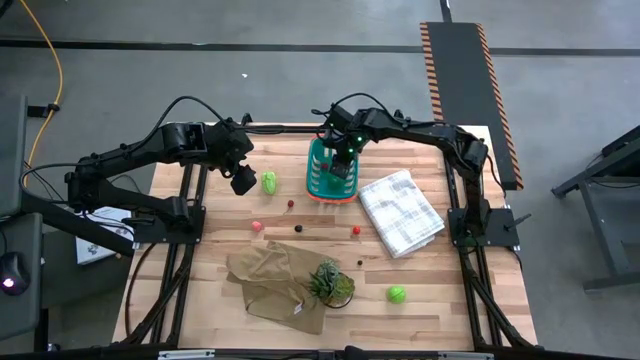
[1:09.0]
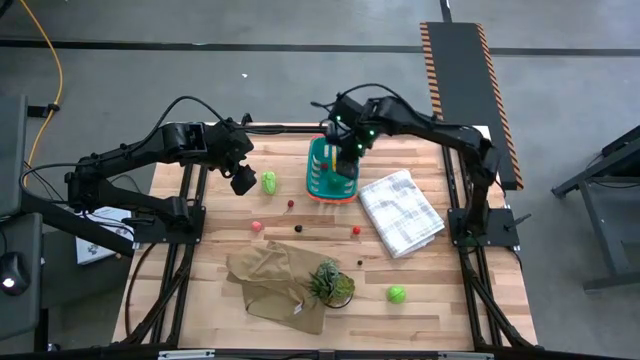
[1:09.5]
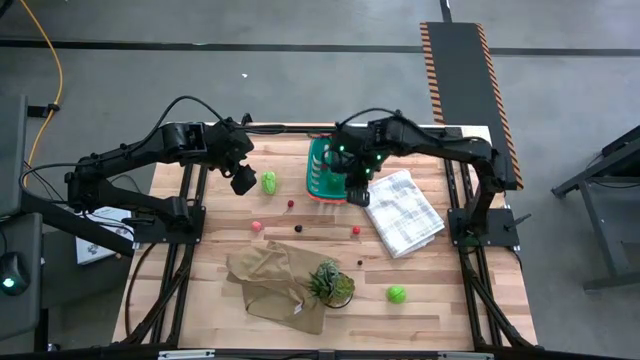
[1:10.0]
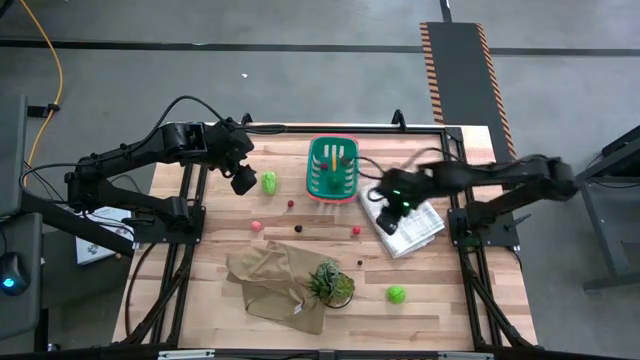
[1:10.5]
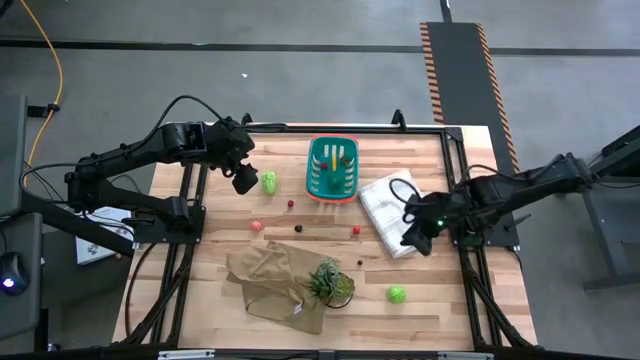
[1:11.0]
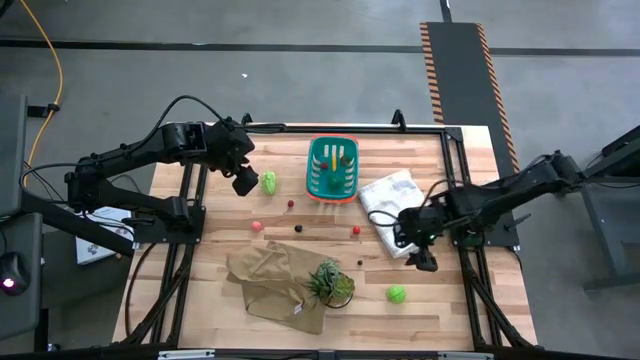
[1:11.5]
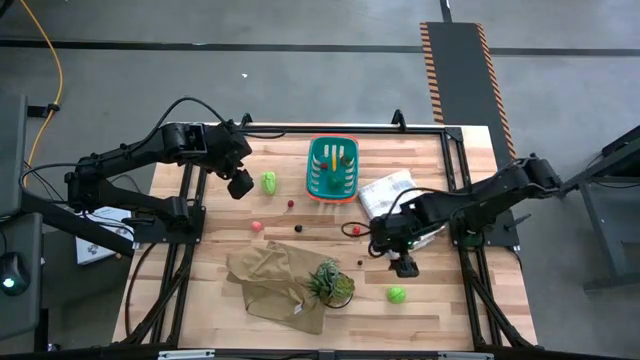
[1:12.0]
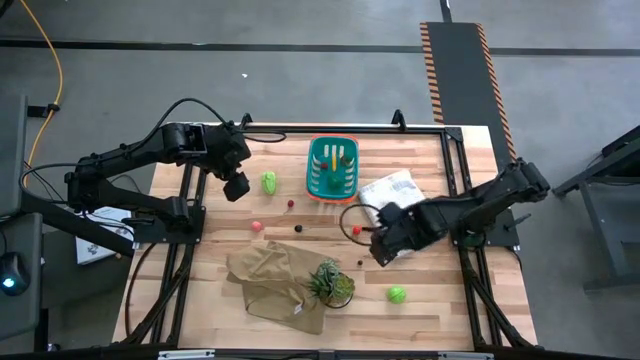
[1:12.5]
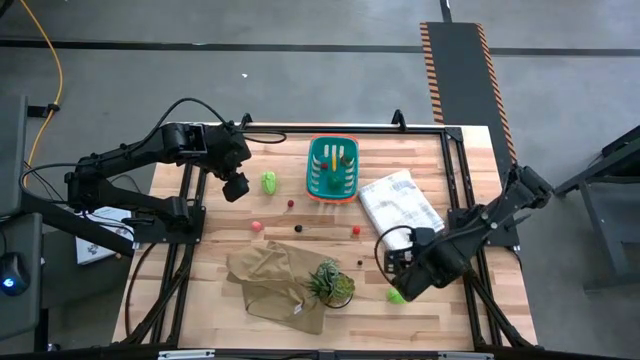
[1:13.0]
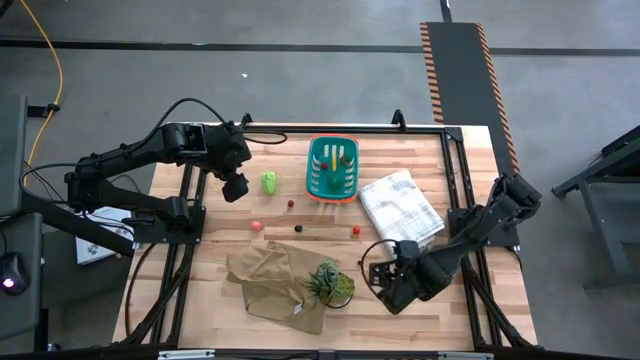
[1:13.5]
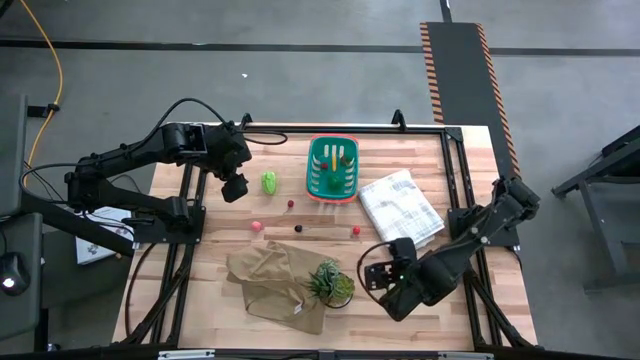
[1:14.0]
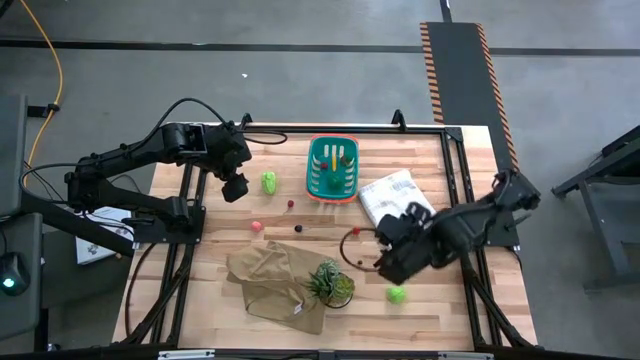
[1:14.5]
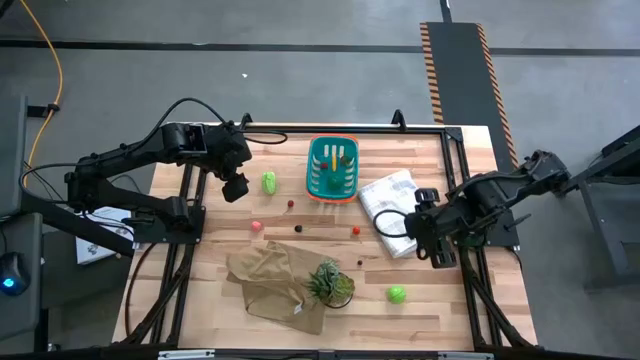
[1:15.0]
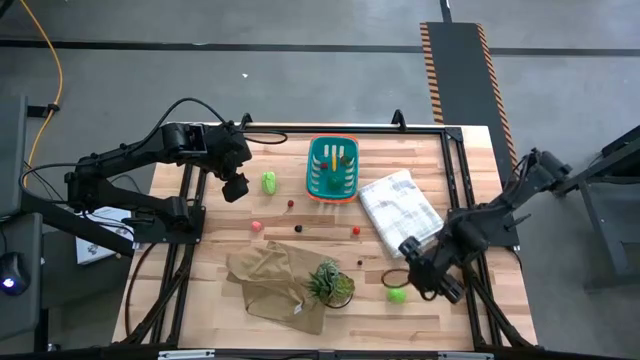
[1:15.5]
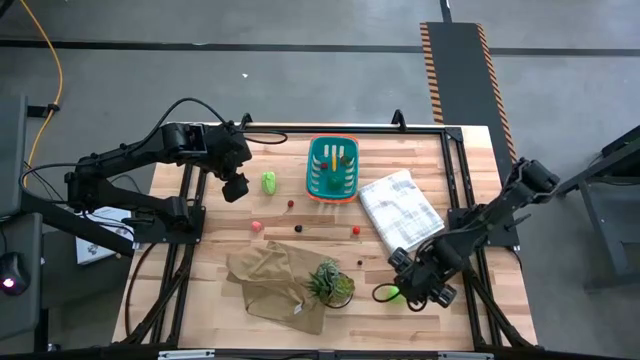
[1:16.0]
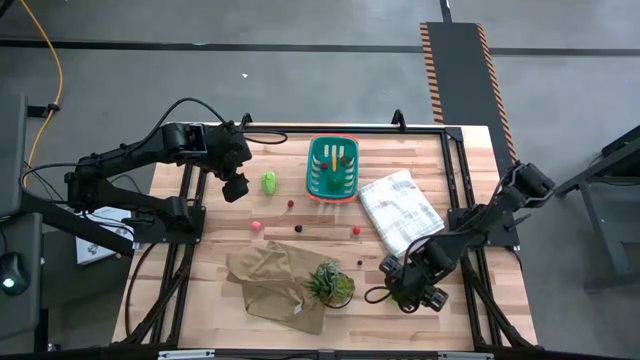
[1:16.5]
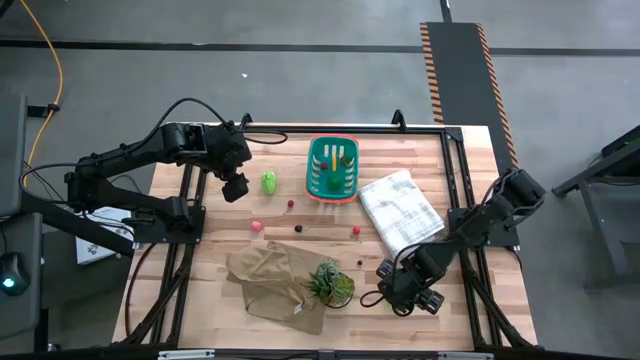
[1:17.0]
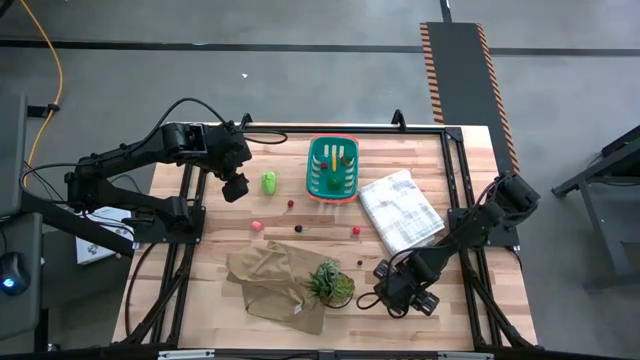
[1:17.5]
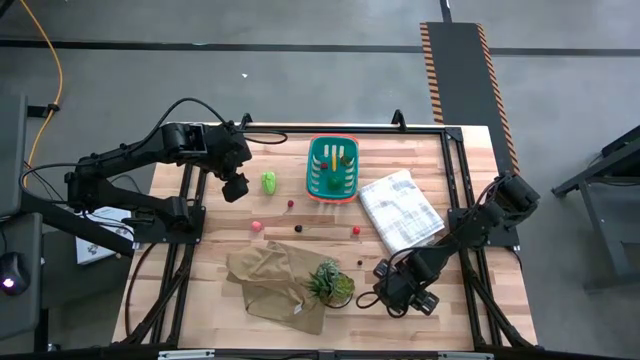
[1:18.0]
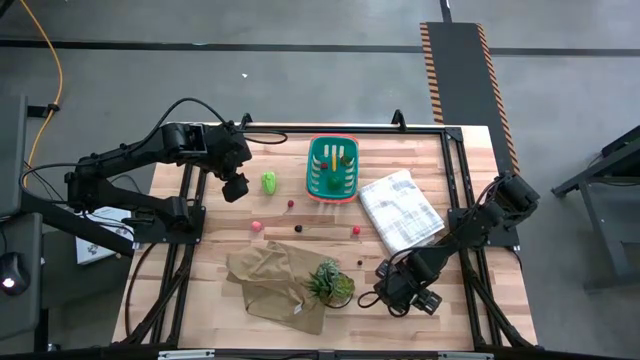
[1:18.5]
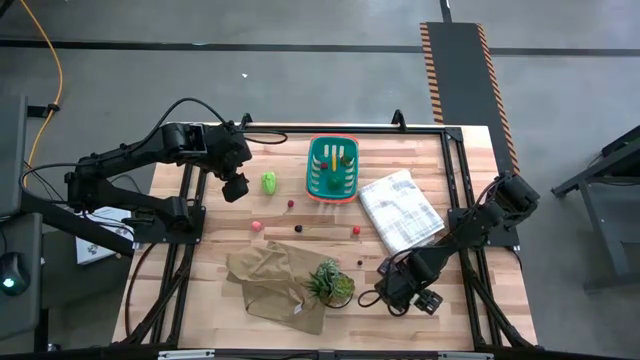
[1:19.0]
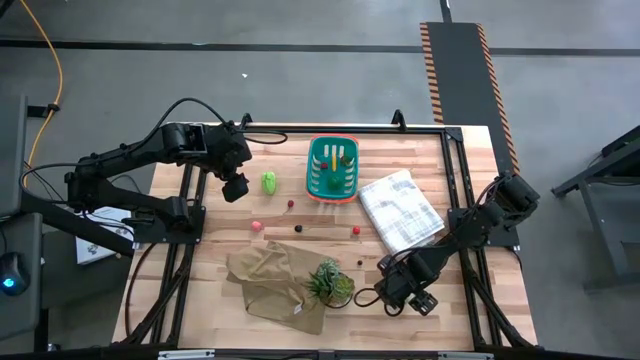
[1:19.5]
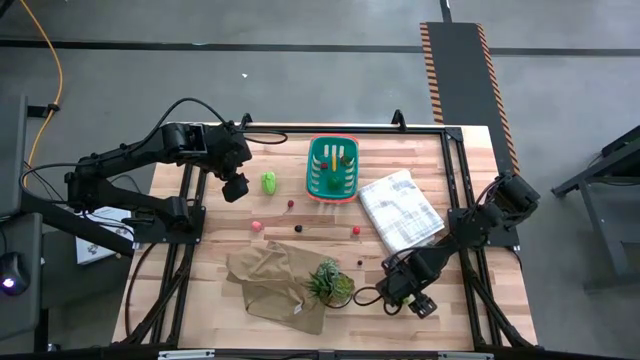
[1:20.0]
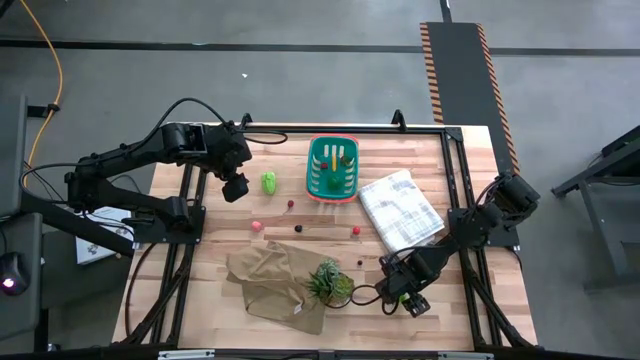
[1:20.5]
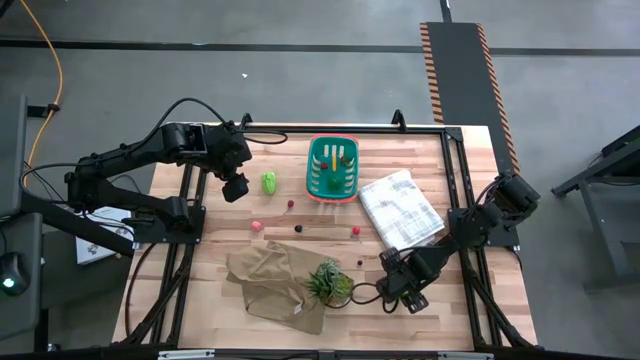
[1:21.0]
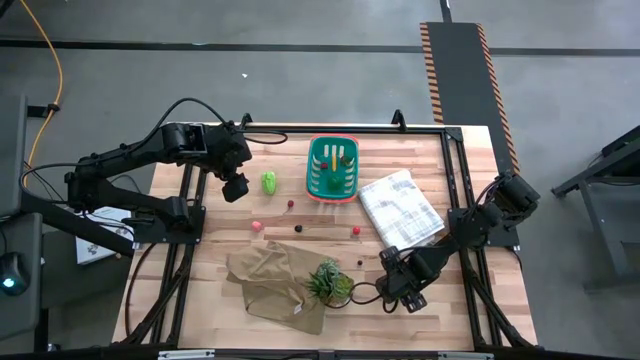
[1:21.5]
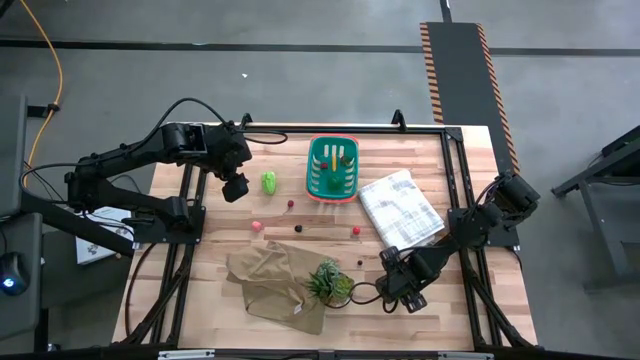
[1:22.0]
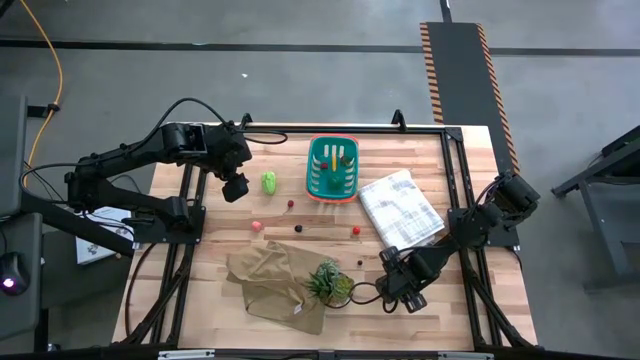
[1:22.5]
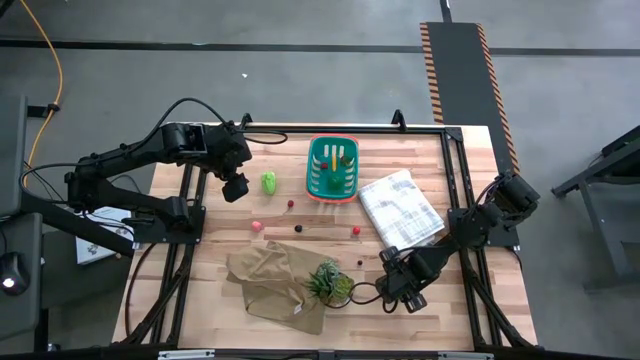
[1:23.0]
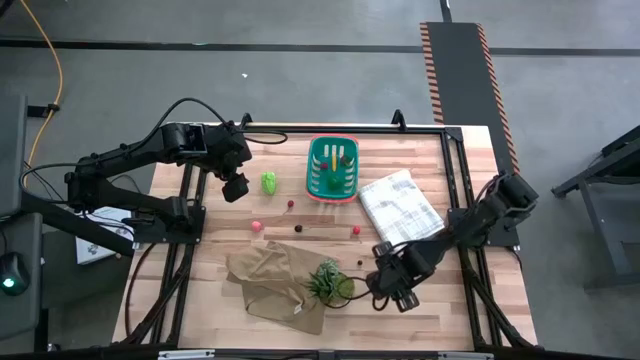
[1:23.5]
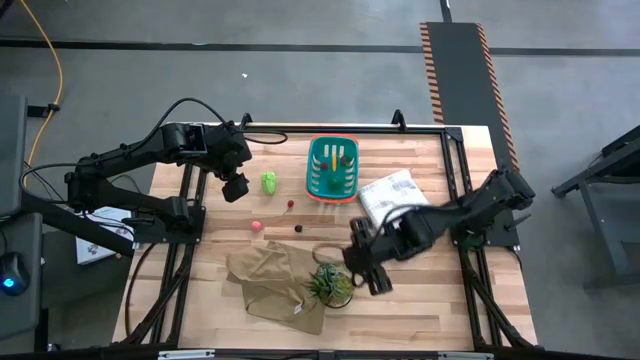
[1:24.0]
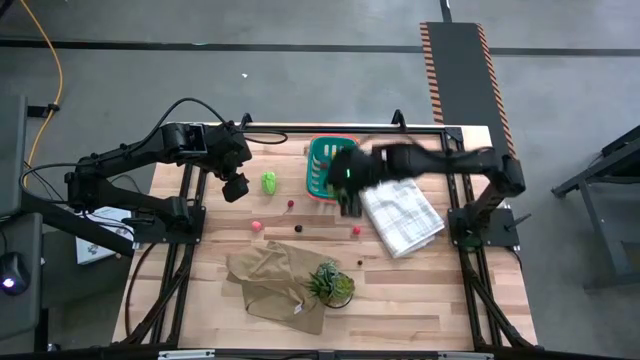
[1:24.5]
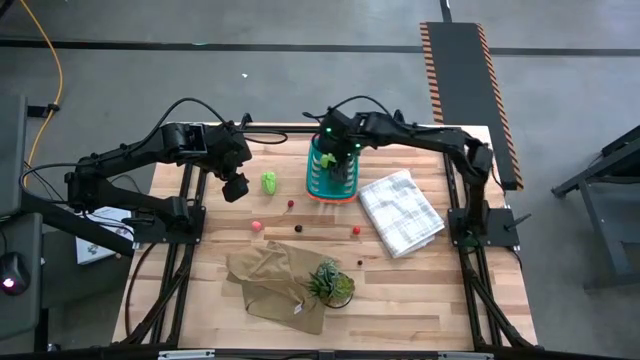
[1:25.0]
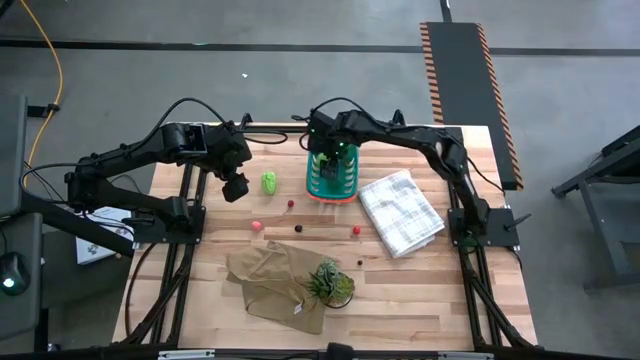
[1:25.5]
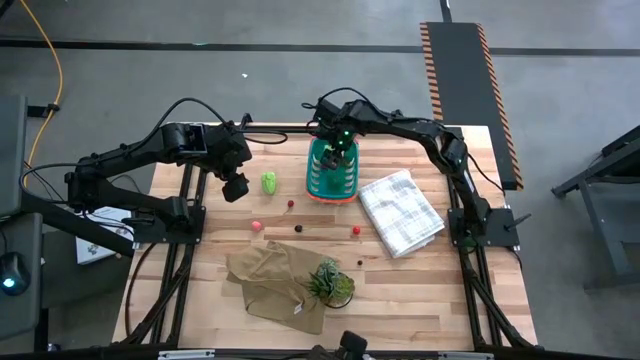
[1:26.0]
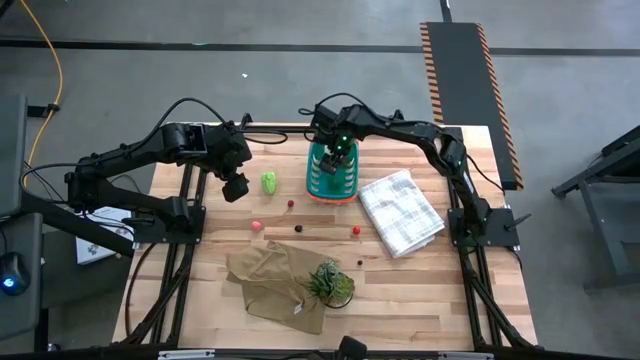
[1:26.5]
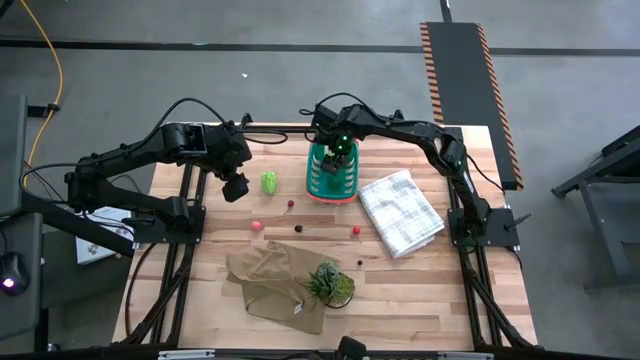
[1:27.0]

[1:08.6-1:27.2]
Task: Pick and placing Produce into tupperware
Put the green cabbage into the green basket

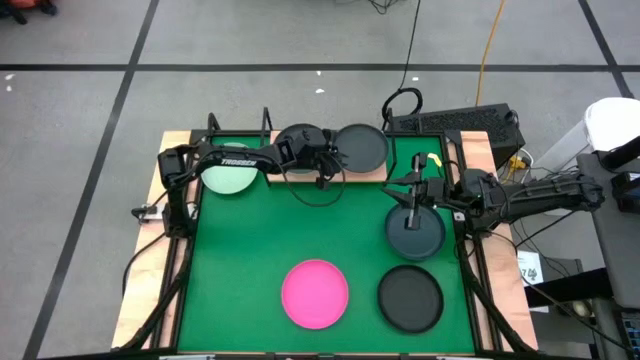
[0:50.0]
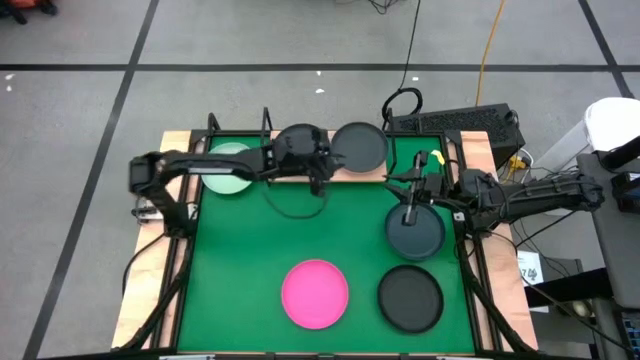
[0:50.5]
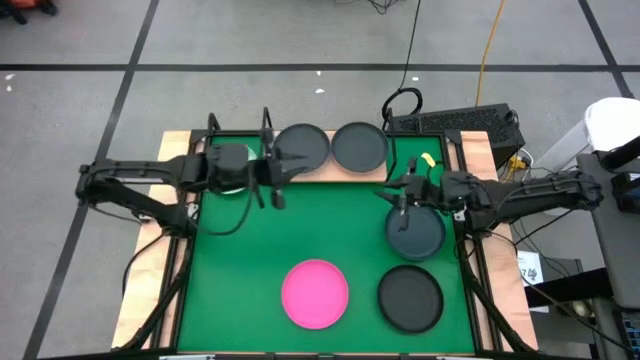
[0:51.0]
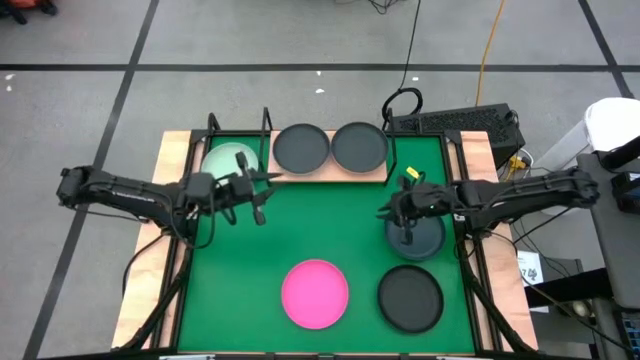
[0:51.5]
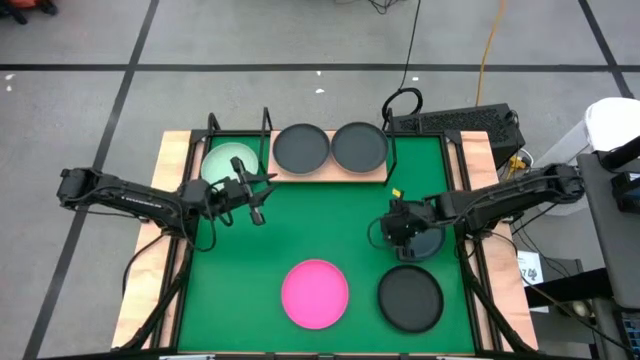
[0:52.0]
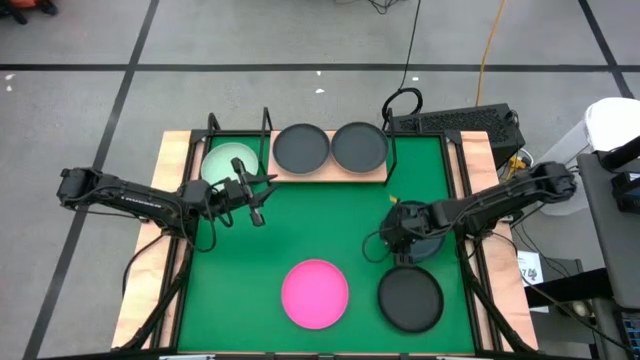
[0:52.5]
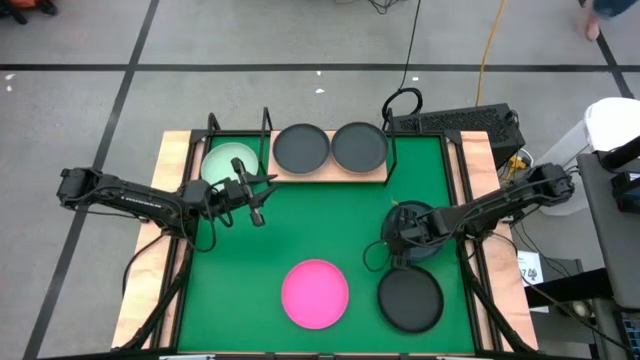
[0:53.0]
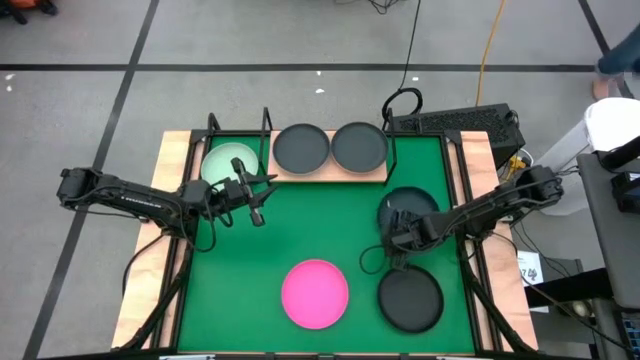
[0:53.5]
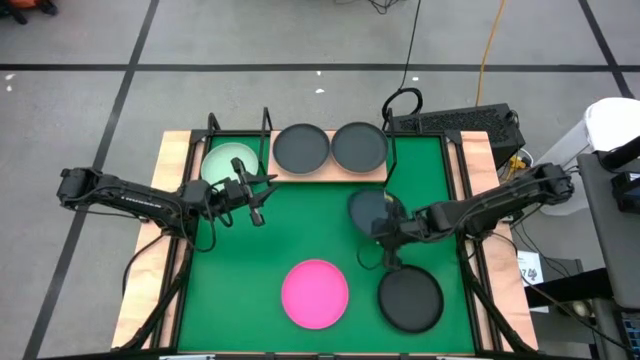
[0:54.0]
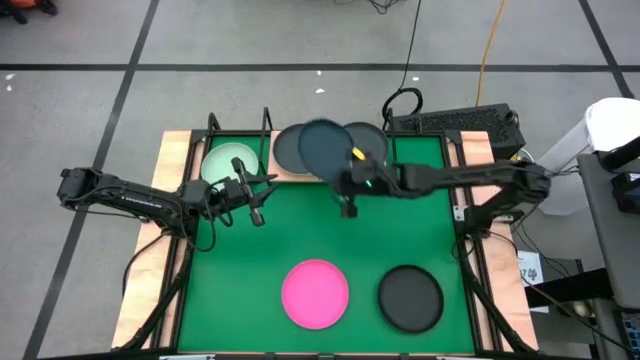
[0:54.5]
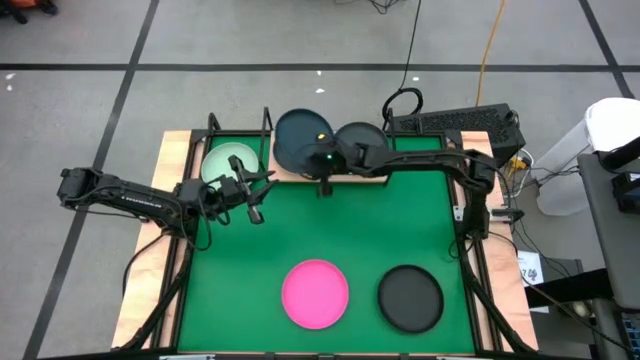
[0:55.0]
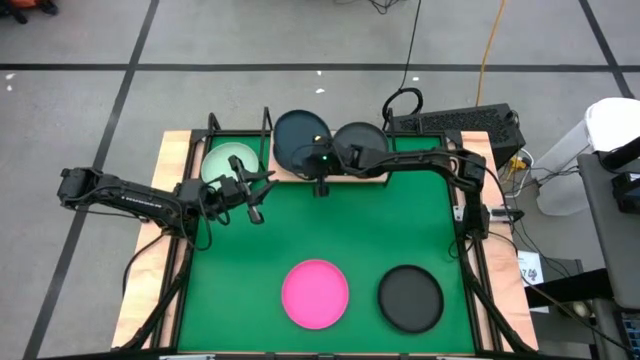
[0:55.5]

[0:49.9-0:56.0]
Task: Place and stack plates onto a shelf
Stack the dark blue plate on top of the left black plate on the shelf
